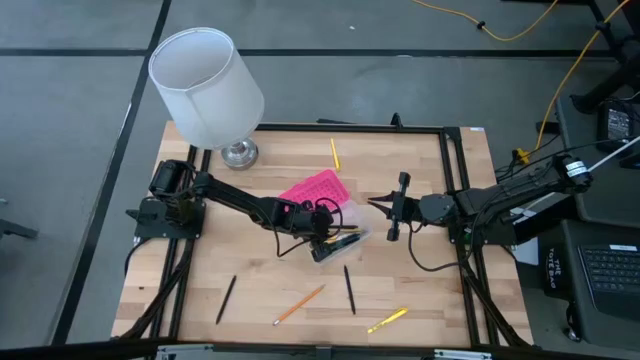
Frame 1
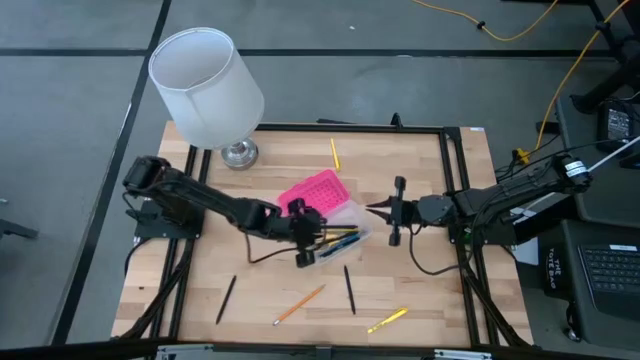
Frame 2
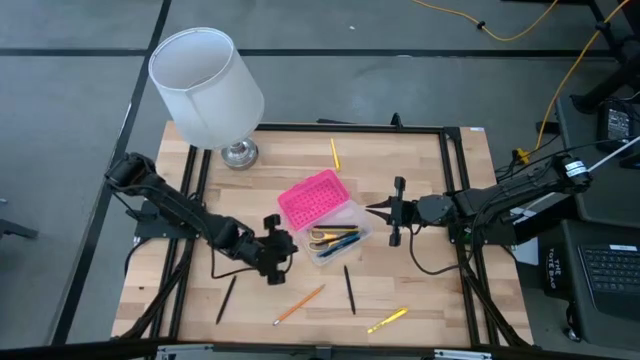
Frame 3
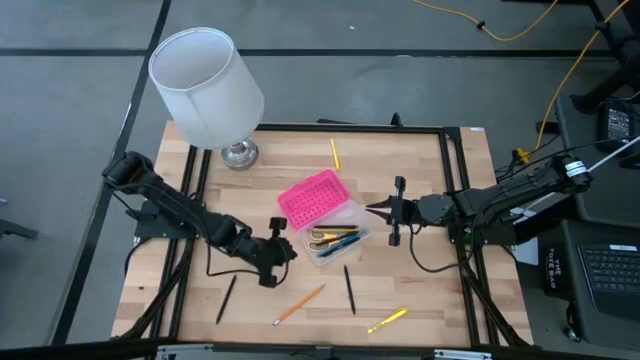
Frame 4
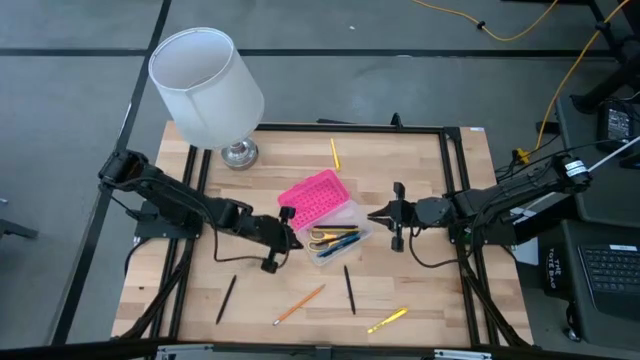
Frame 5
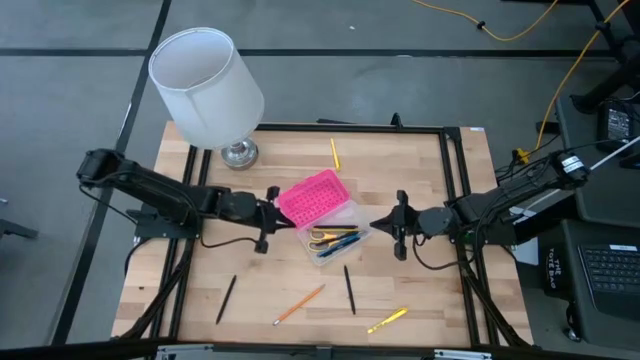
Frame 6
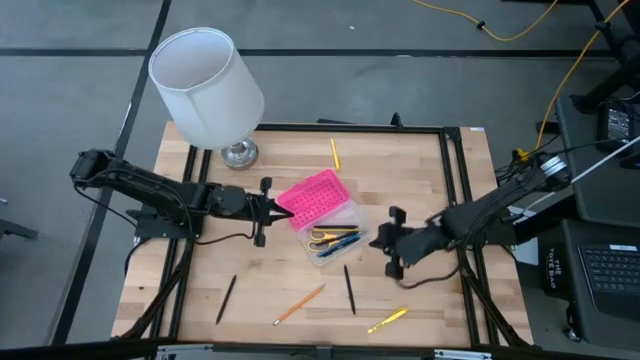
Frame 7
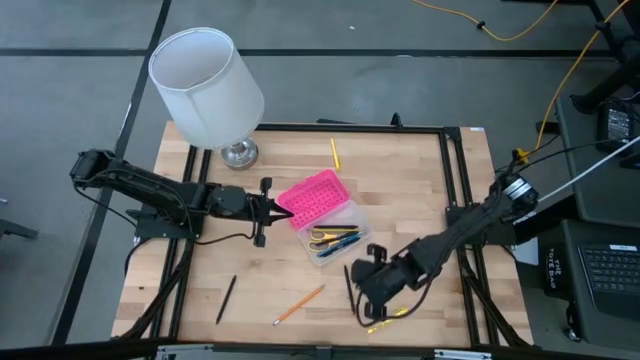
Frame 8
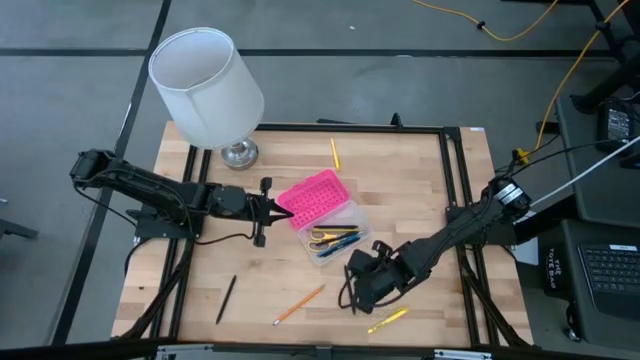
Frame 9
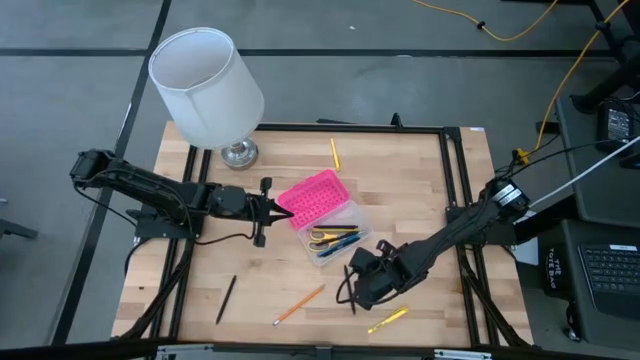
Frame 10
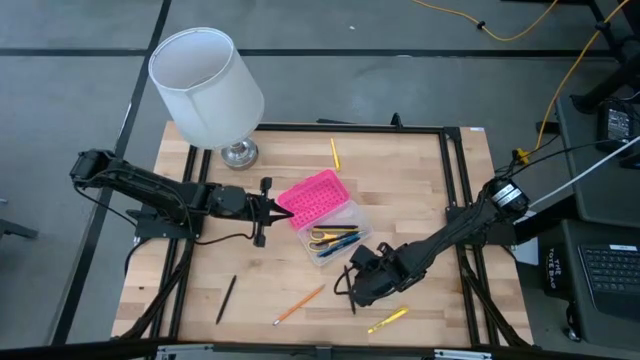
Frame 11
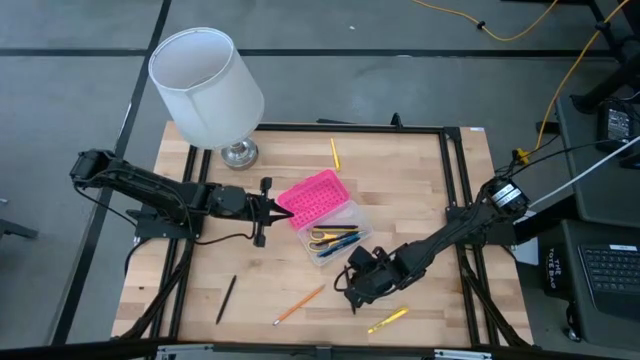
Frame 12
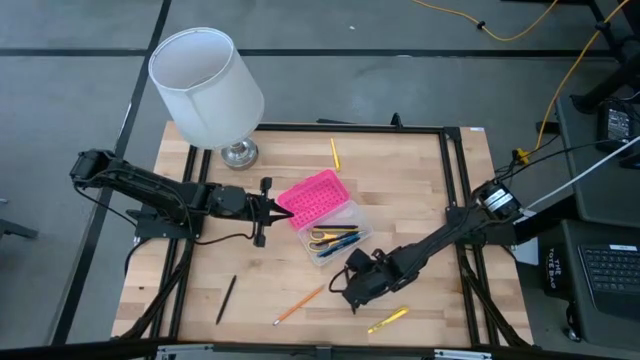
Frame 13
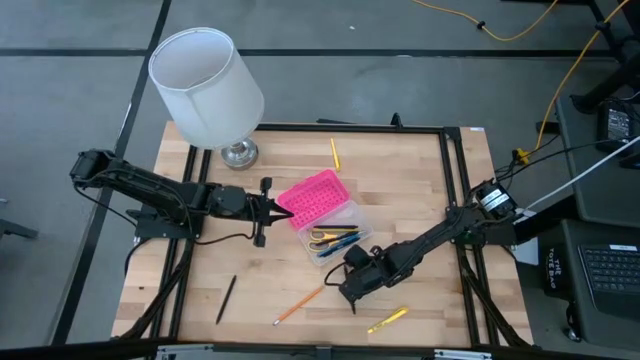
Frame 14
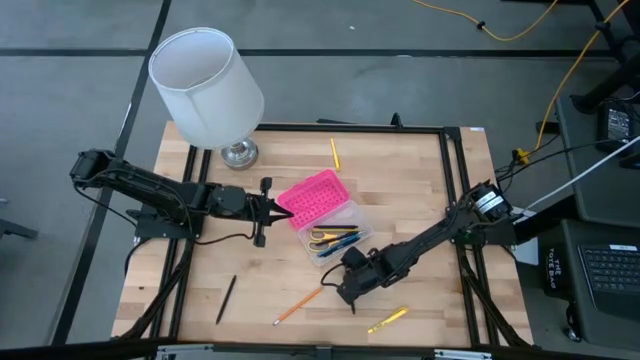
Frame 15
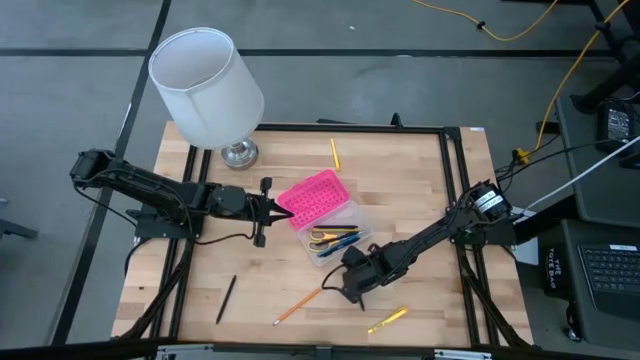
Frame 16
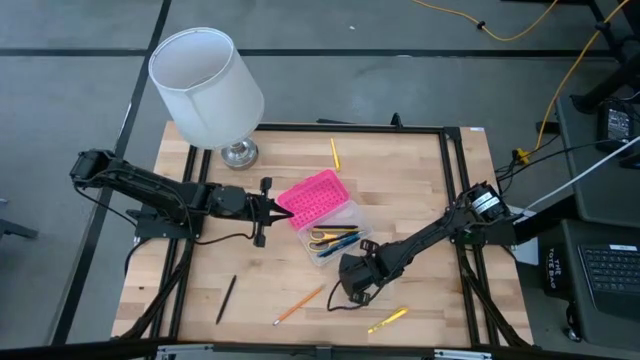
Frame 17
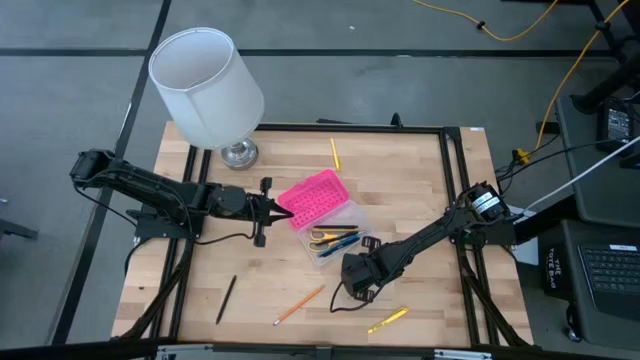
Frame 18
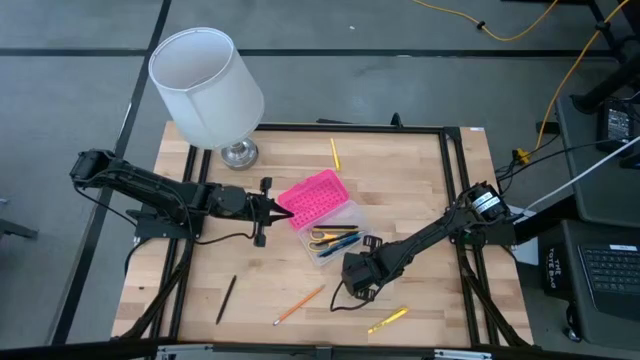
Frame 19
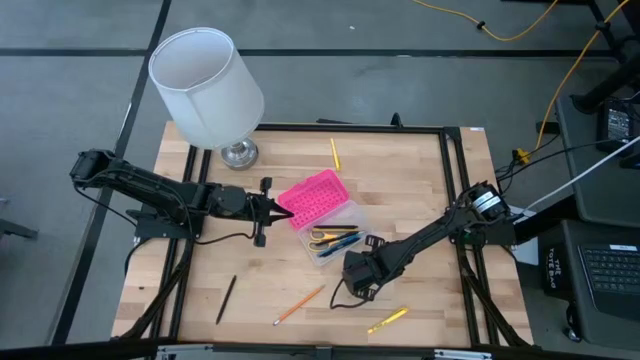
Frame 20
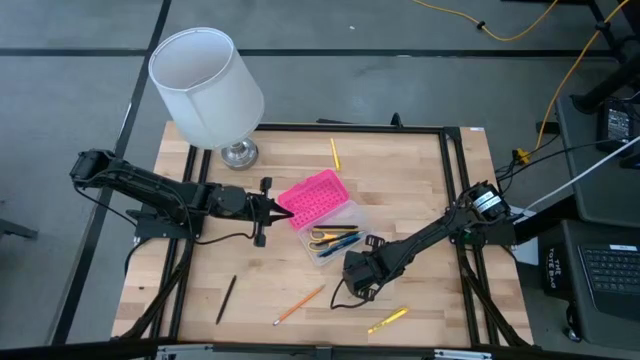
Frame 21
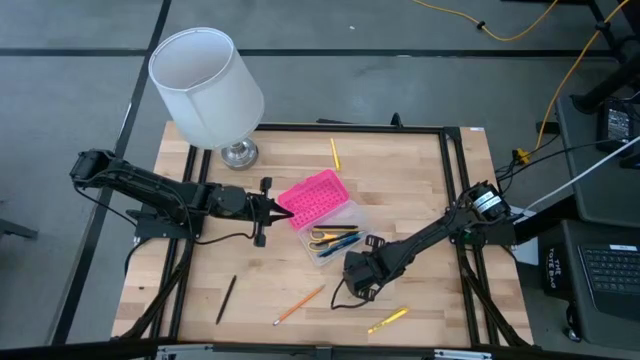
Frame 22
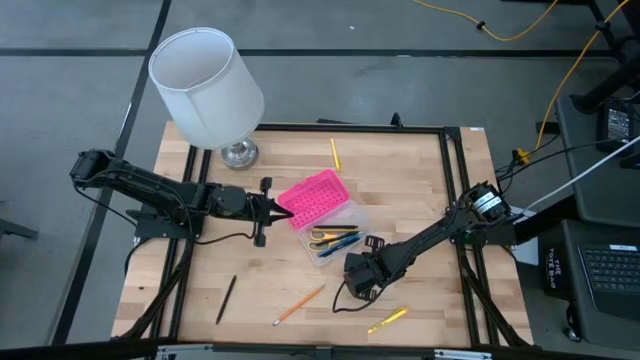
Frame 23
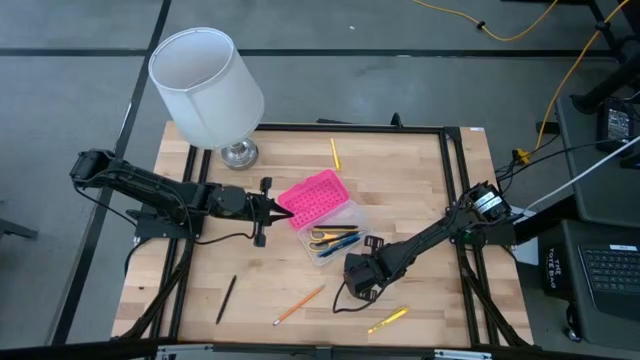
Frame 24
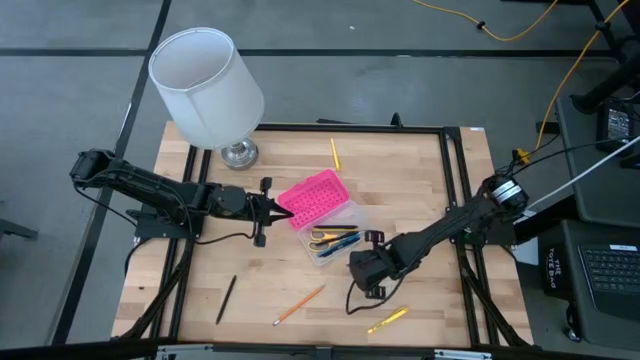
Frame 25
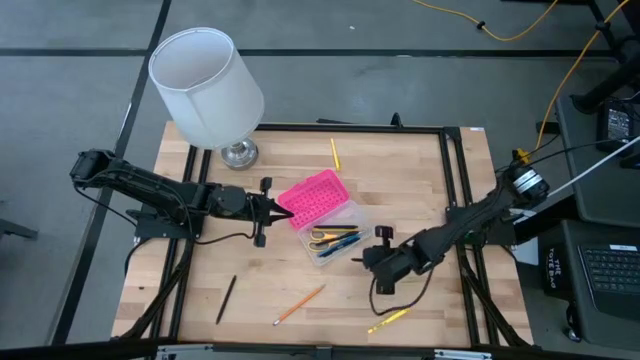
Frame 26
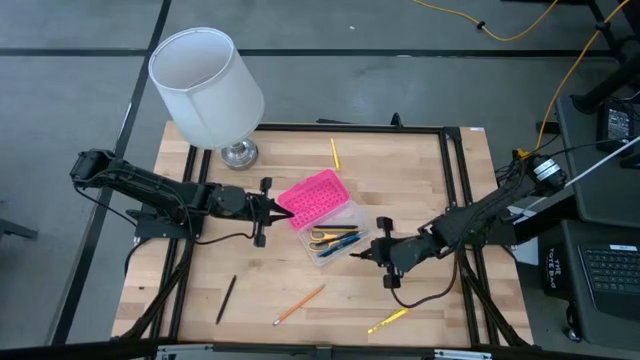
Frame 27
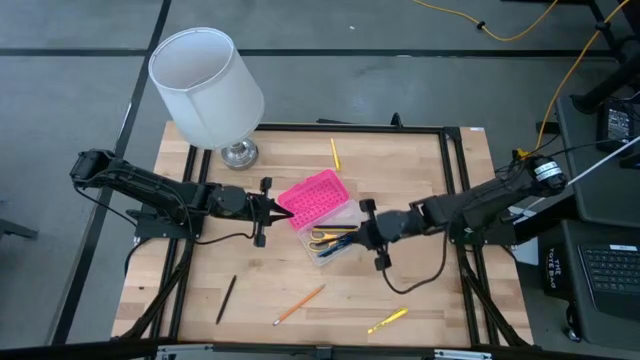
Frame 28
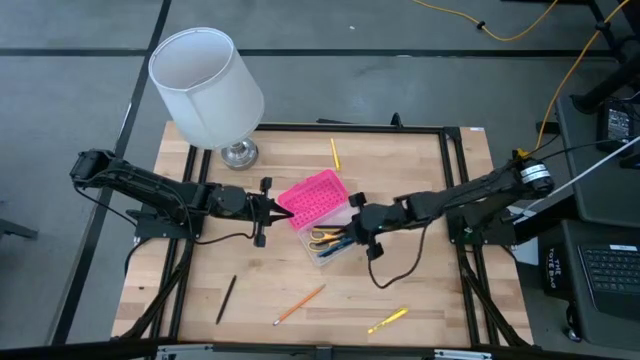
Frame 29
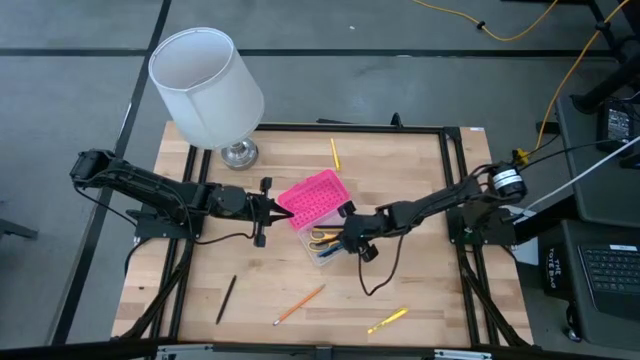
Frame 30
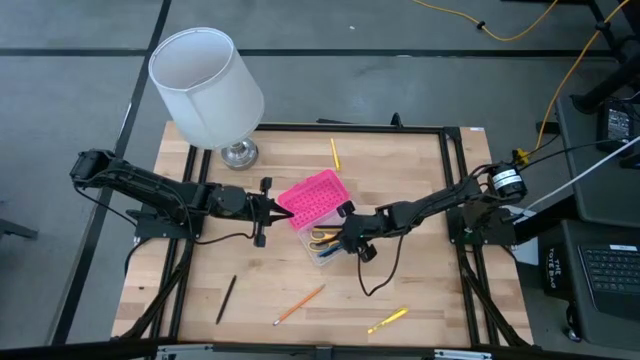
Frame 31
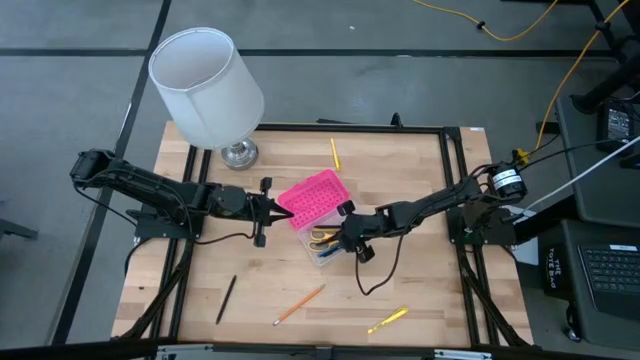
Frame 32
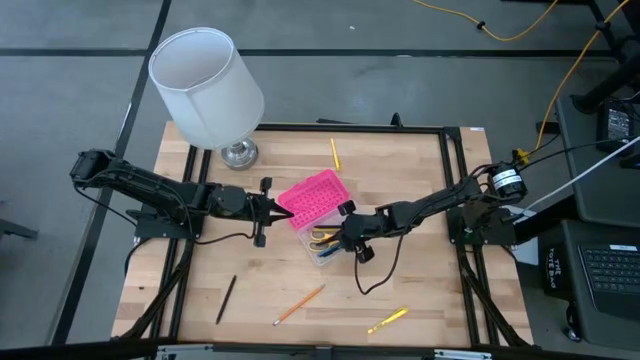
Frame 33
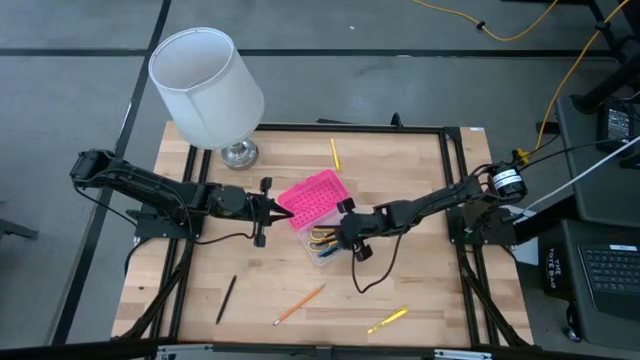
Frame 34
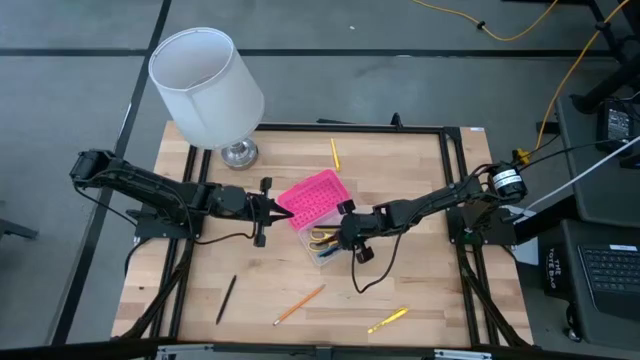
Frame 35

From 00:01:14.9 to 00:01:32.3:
Task: Pick & place school supplies into a supply box
Put the black pen into the supply box
